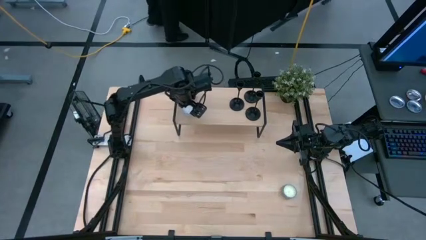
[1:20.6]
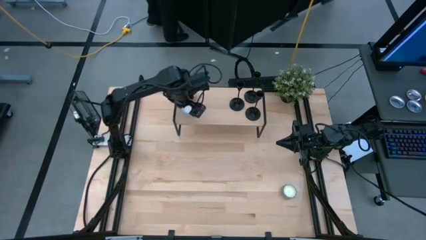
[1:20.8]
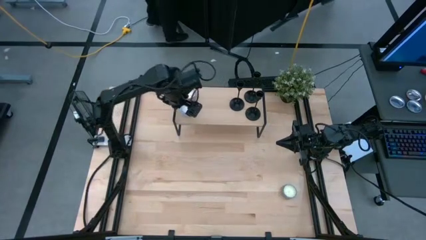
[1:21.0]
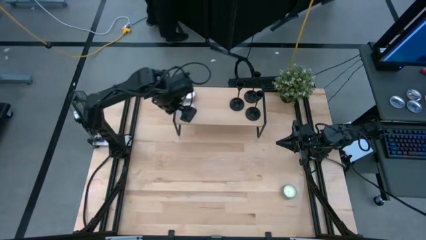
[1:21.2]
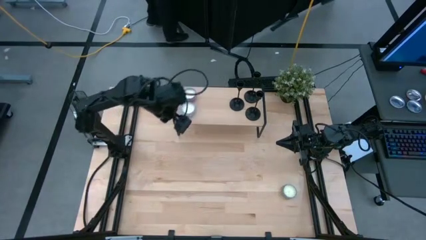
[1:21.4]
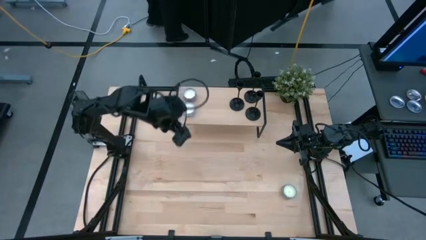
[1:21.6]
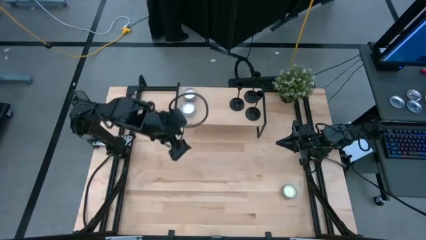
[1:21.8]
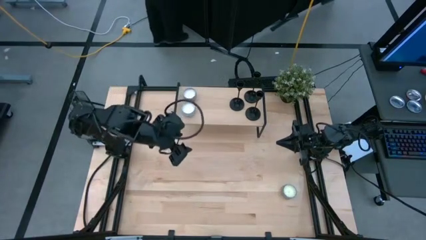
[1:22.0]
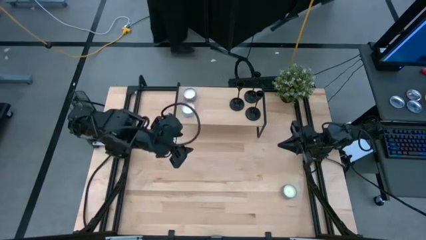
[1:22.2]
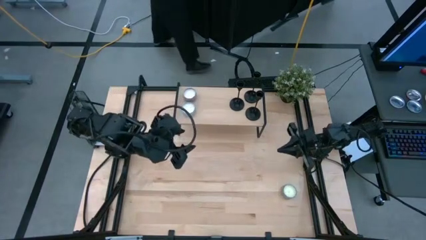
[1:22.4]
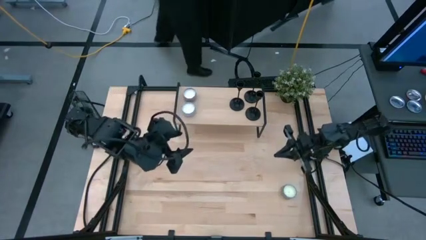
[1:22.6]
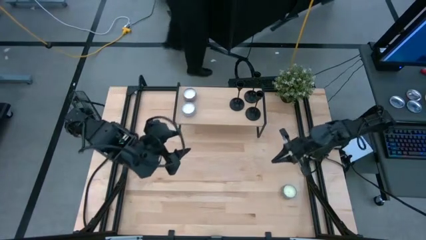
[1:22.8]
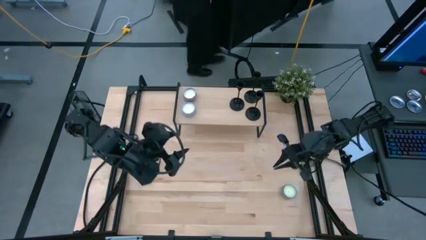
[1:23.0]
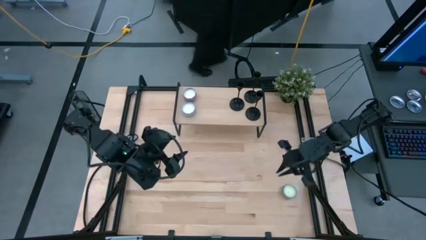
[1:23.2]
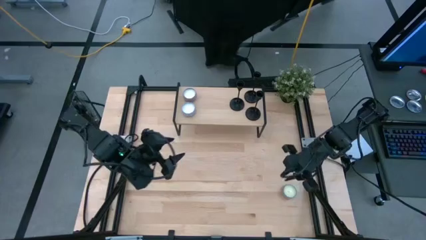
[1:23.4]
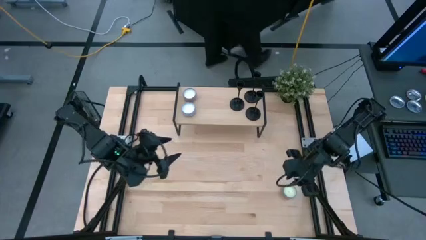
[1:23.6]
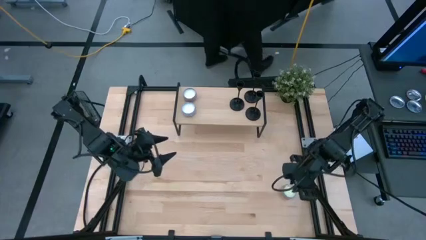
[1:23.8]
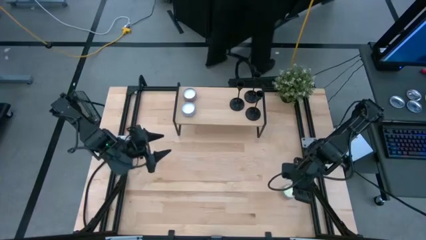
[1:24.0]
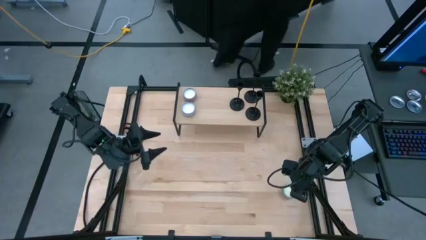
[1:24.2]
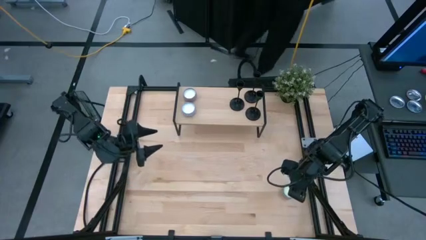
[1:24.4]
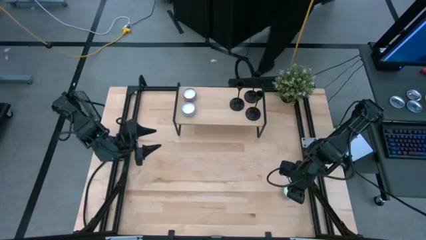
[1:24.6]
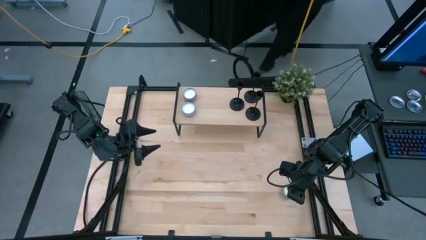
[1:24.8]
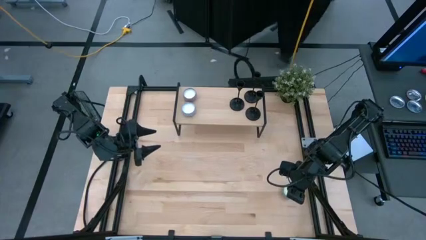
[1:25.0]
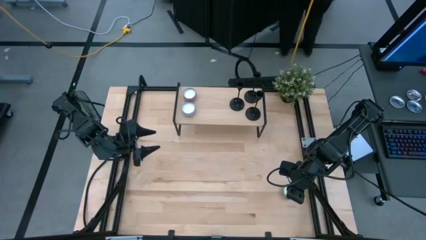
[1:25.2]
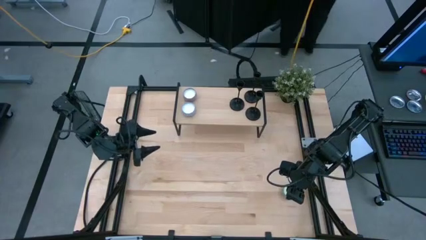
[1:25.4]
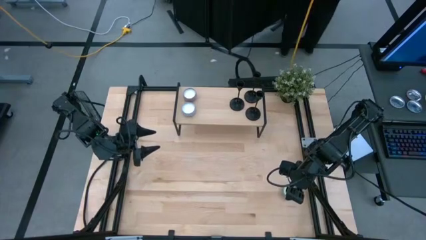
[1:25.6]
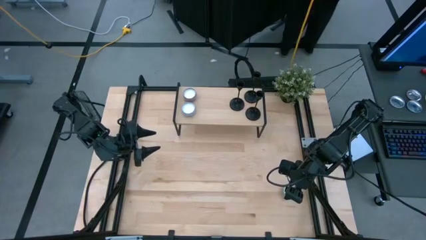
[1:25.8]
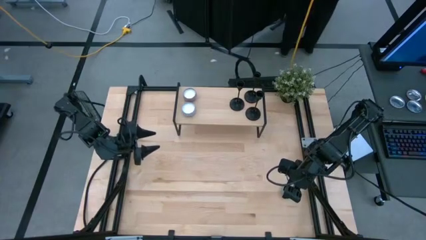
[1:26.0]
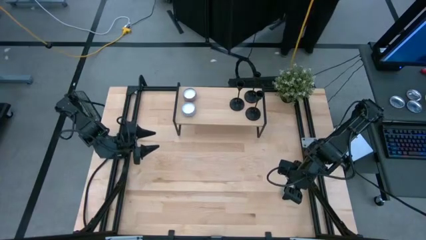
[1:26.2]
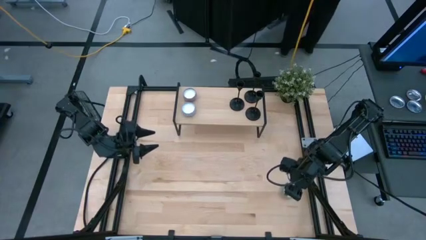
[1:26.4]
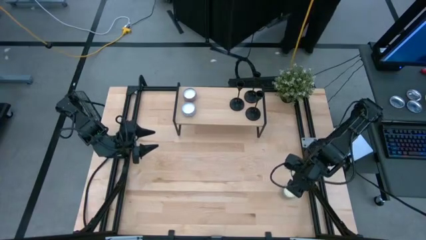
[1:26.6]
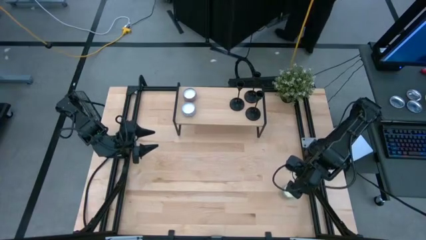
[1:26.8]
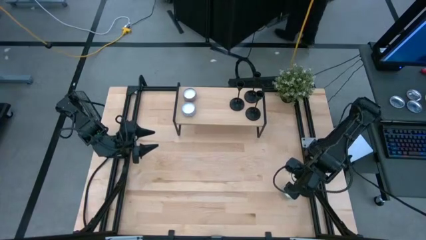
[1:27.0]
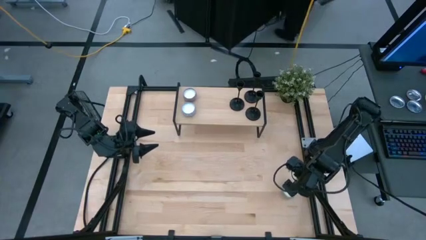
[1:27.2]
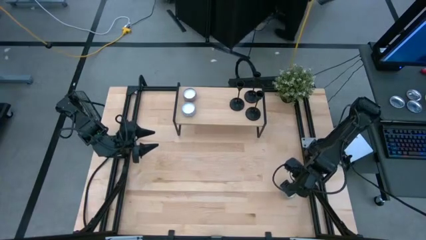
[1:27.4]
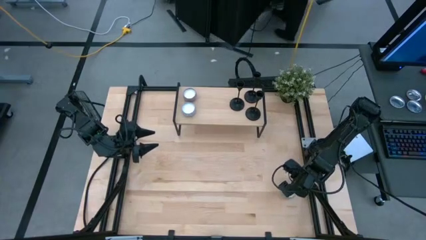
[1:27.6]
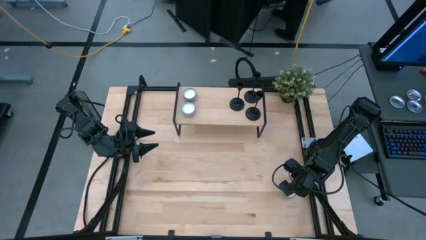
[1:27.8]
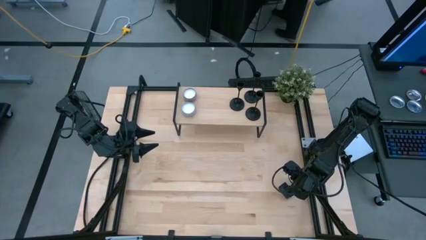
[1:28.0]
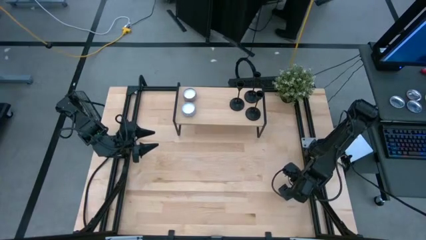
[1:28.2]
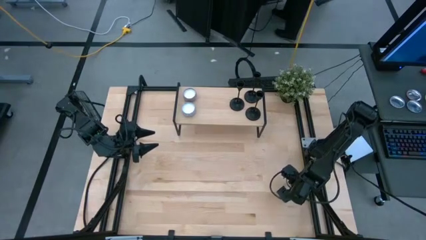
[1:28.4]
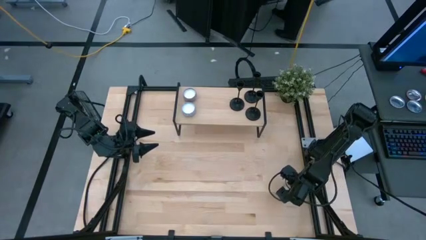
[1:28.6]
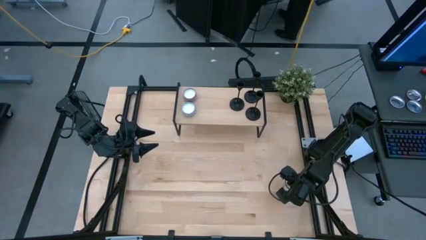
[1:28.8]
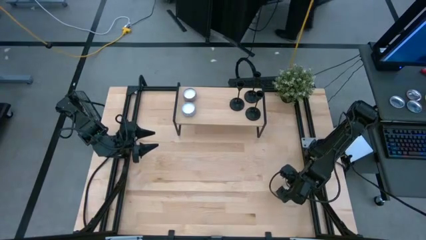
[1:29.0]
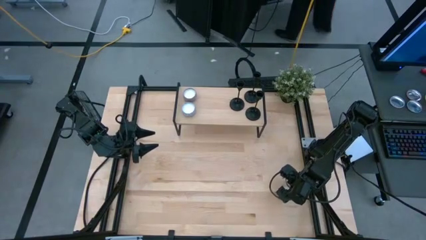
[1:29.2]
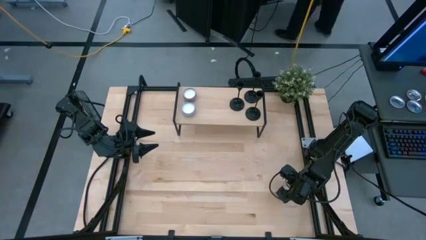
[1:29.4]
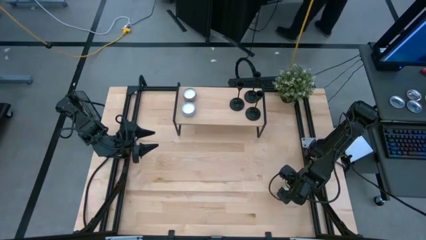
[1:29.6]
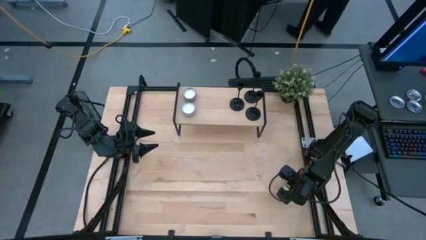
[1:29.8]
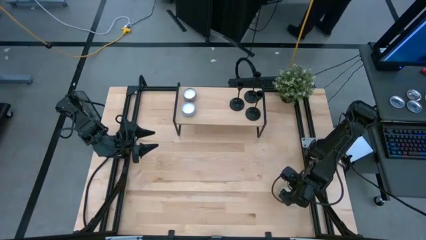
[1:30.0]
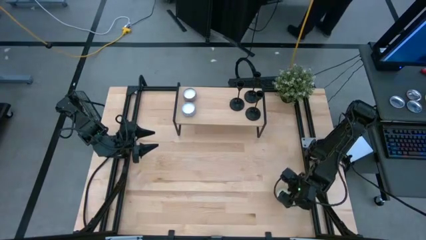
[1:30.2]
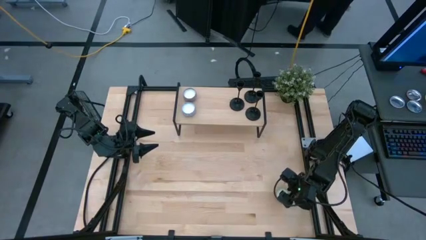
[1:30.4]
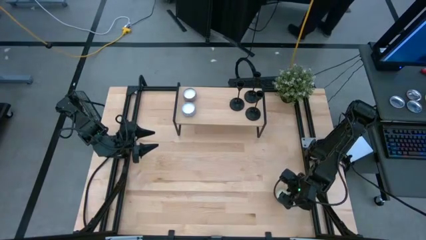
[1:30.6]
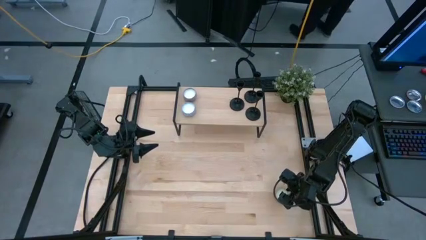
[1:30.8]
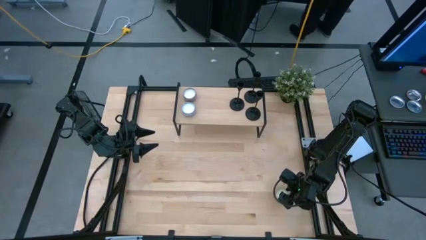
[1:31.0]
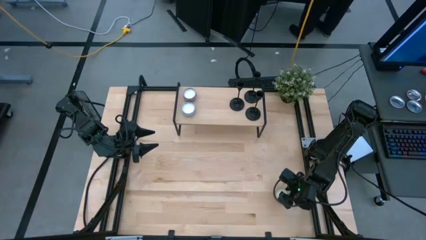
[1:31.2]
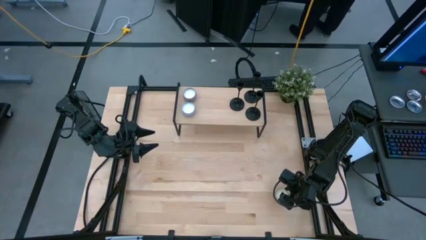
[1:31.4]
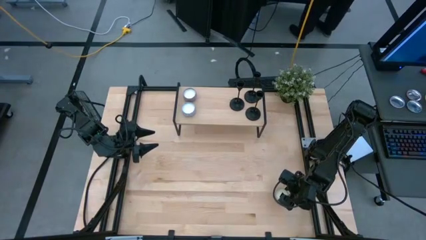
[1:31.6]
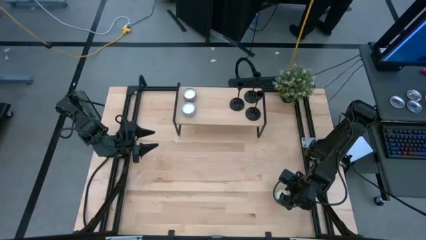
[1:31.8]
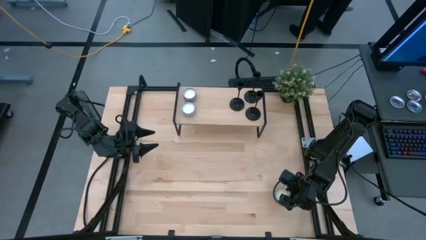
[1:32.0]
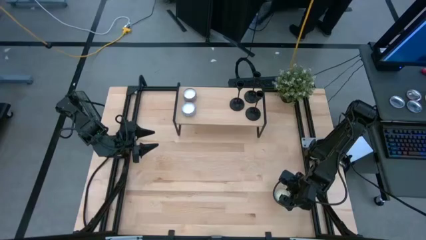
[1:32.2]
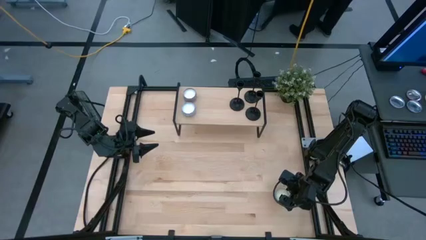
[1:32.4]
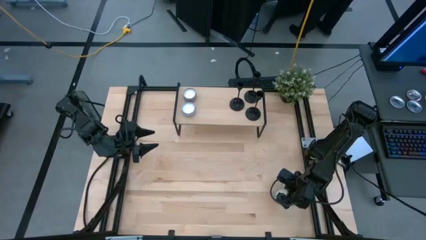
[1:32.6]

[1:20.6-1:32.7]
Task: Pick & Place candle stick holders
Put the green scented candle on the shelf

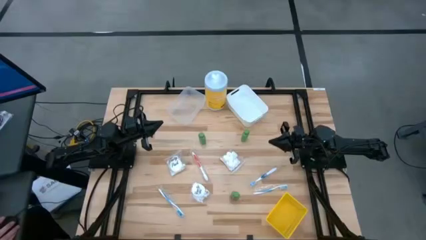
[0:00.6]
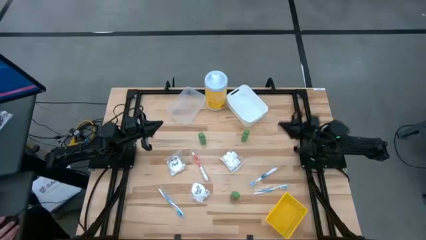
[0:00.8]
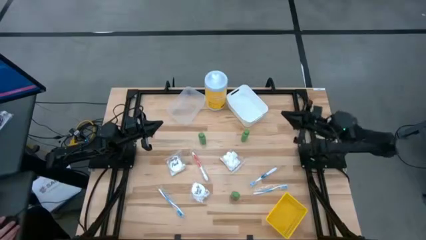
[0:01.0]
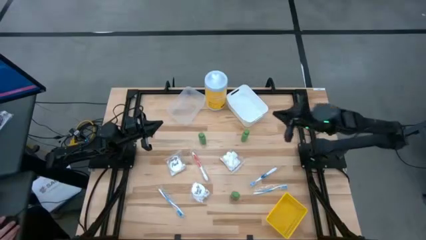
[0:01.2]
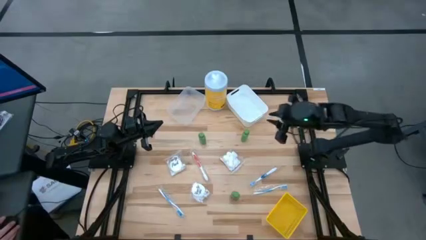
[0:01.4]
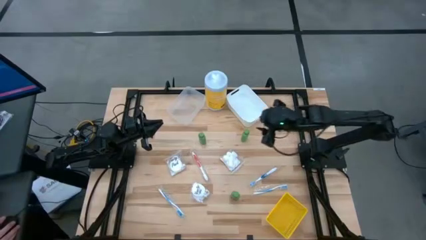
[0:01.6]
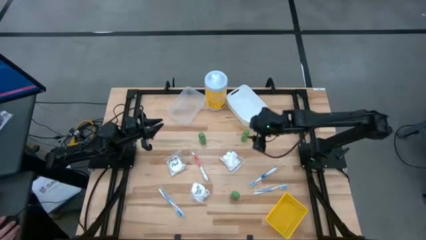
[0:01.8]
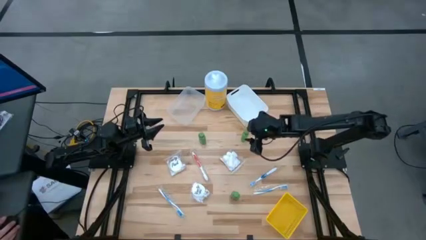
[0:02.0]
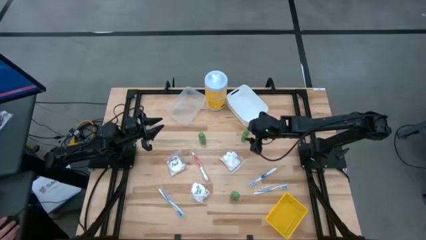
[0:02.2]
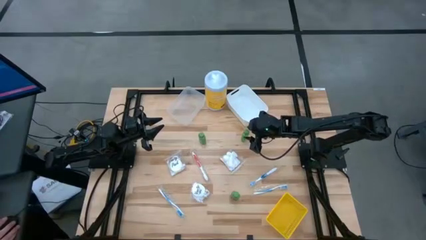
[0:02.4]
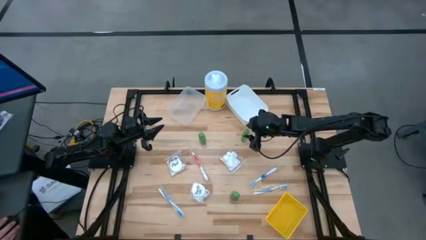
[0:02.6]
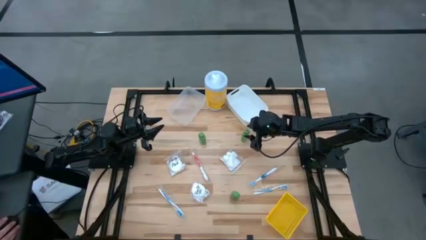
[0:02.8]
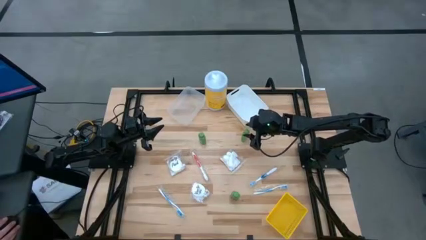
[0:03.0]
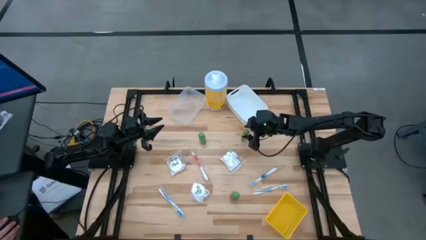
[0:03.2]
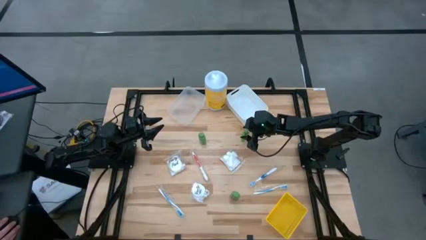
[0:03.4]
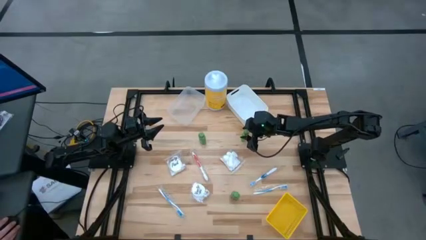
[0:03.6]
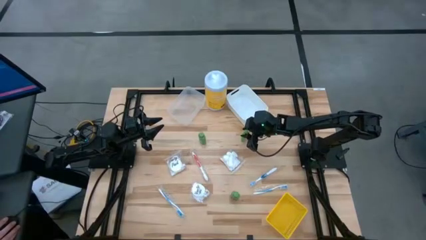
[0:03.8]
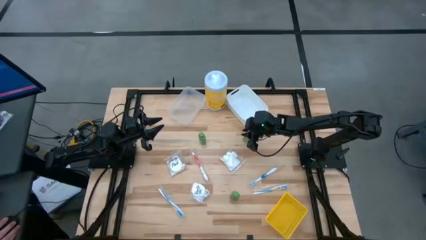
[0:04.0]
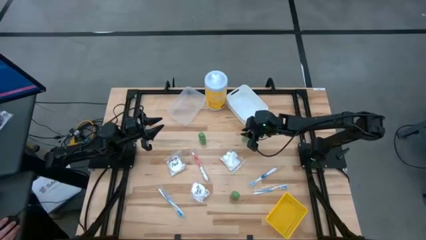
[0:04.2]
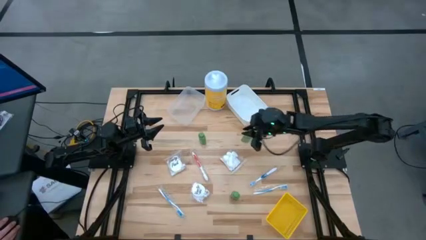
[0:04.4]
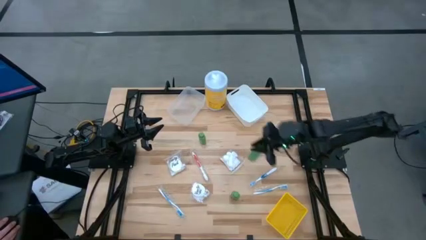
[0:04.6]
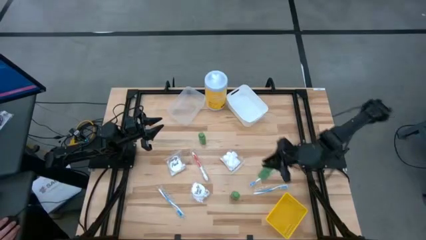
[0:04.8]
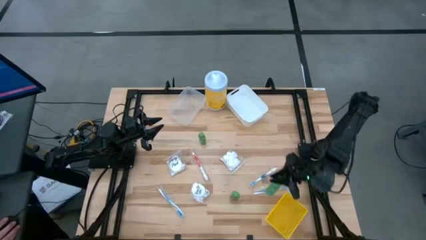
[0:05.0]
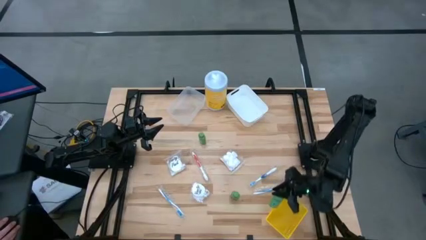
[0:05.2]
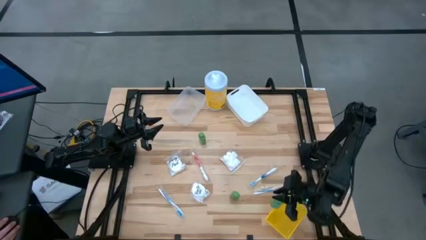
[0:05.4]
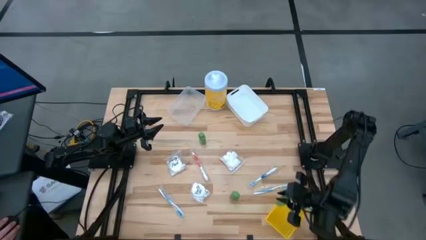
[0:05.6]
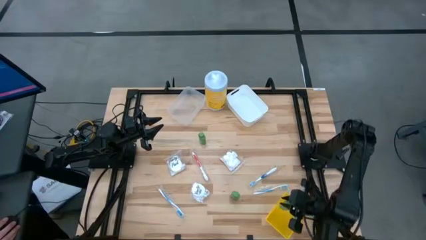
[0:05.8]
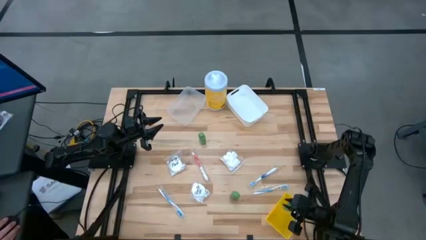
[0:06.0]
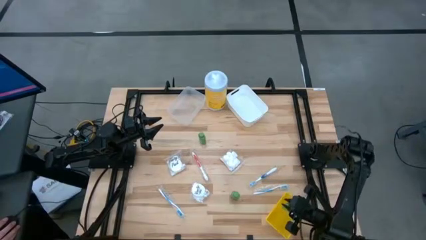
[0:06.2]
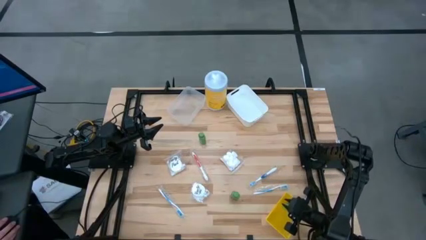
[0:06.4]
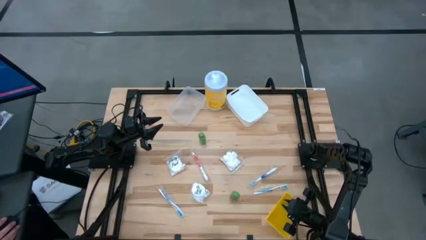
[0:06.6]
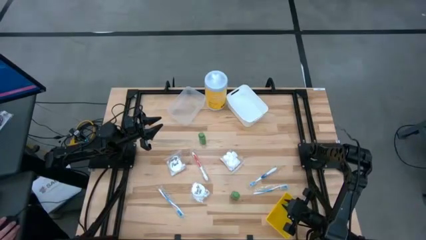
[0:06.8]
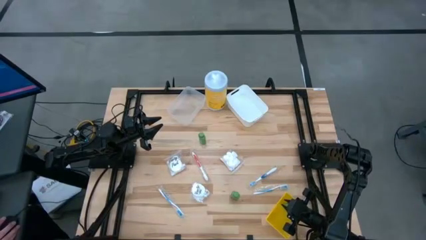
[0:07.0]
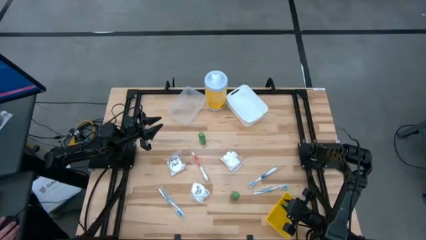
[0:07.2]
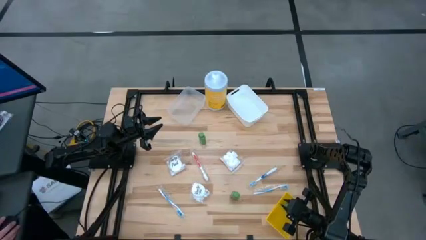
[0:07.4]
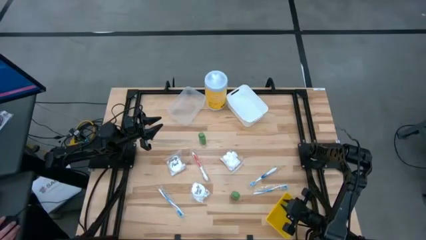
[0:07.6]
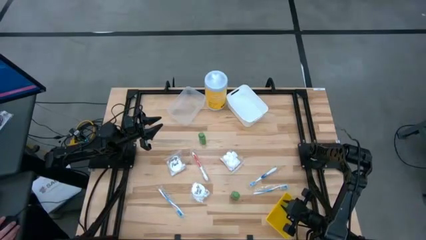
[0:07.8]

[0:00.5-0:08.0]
Task: Pick & Place Travel size toiletries
Put the top right shampoo into the yellow bin
